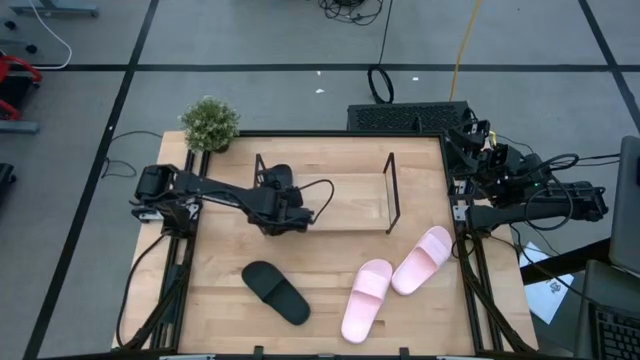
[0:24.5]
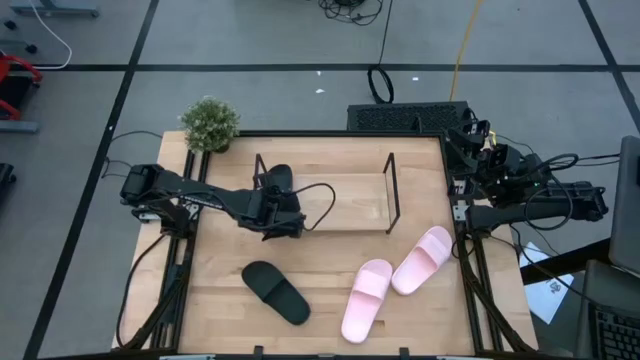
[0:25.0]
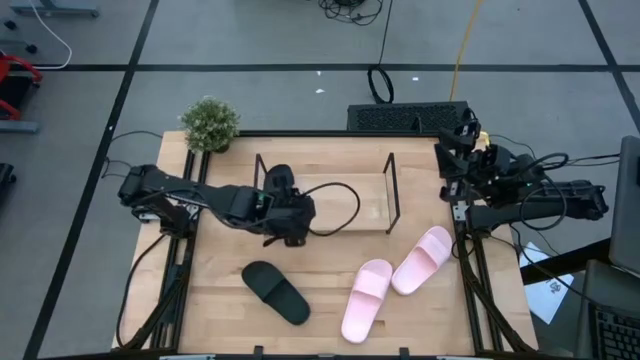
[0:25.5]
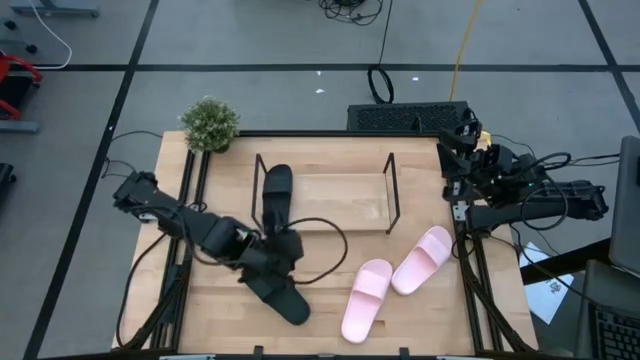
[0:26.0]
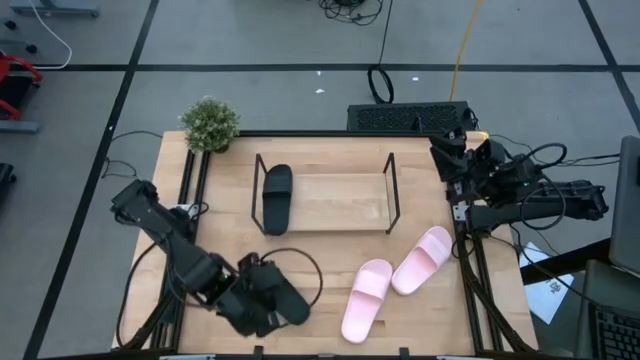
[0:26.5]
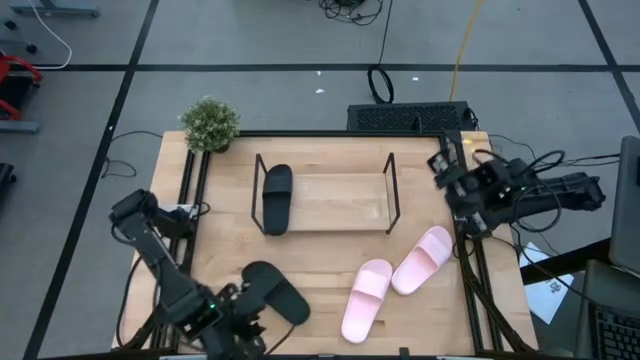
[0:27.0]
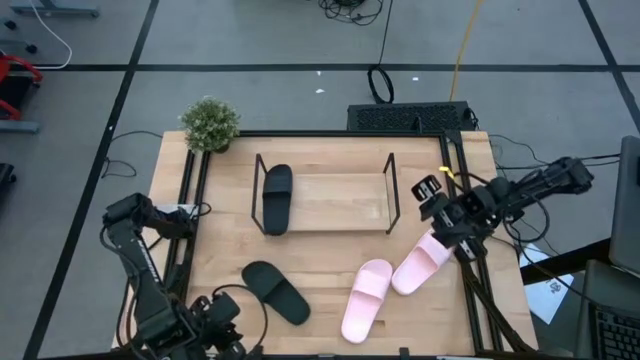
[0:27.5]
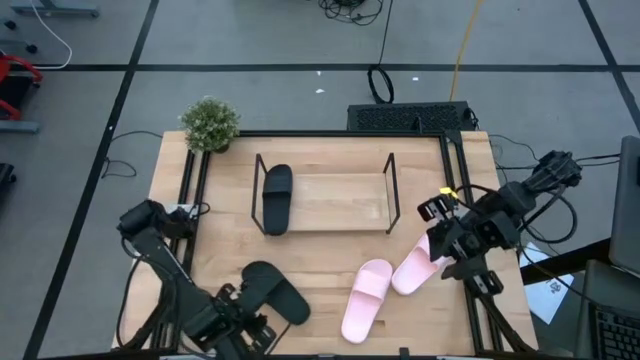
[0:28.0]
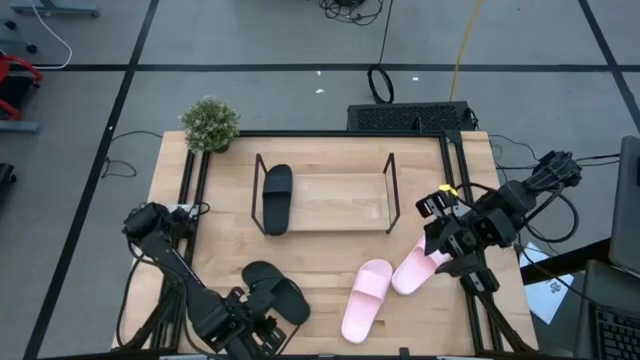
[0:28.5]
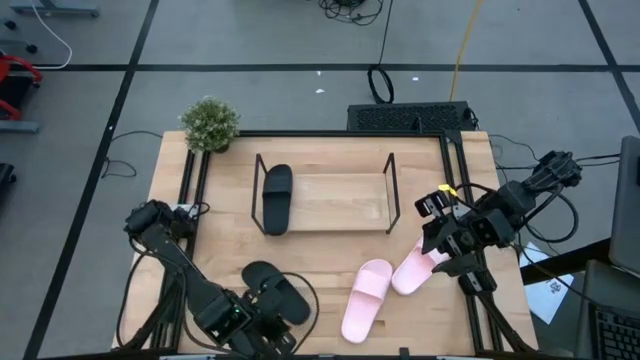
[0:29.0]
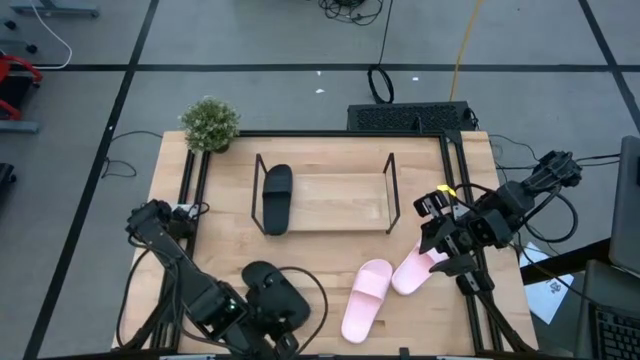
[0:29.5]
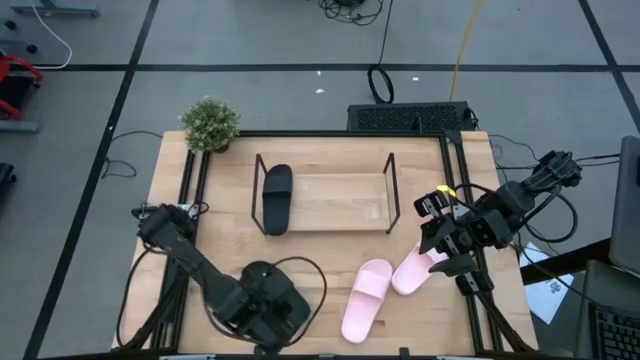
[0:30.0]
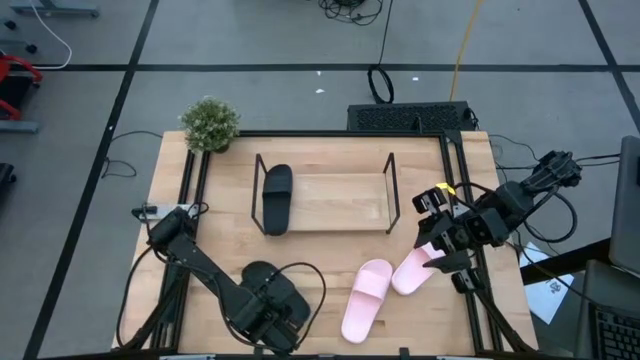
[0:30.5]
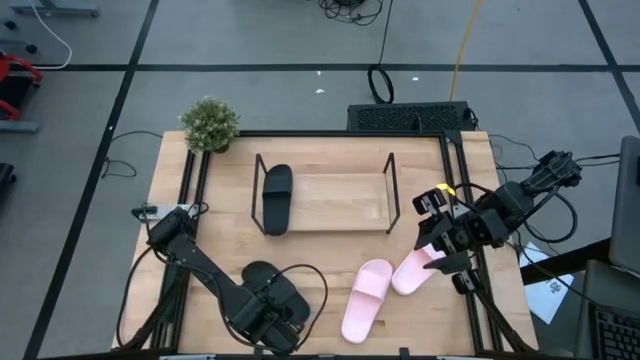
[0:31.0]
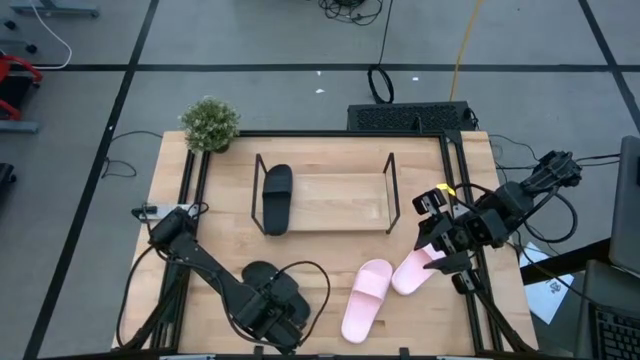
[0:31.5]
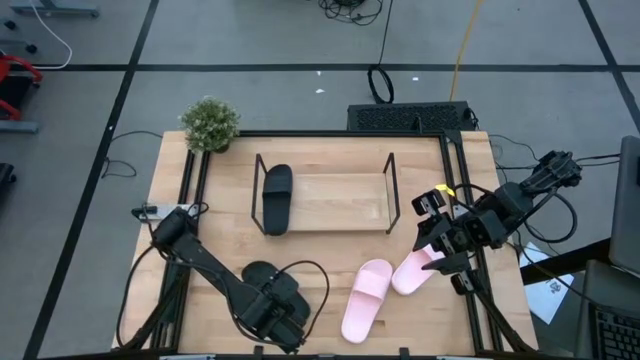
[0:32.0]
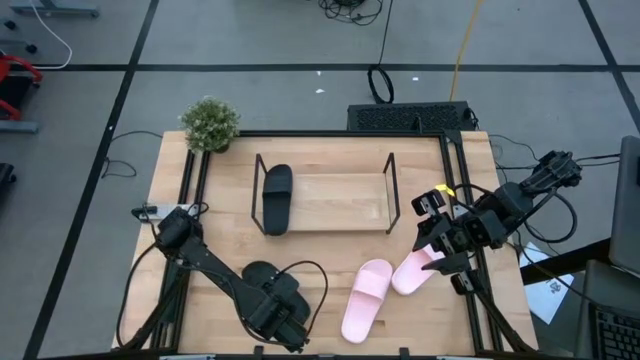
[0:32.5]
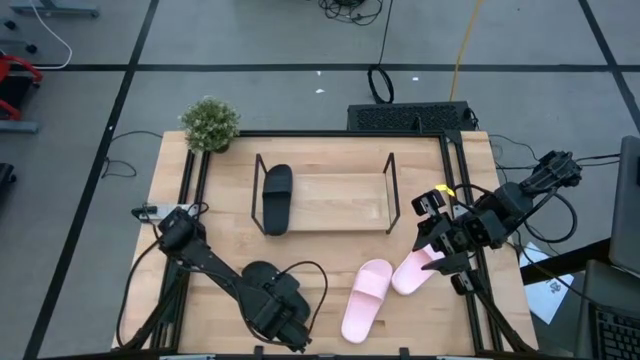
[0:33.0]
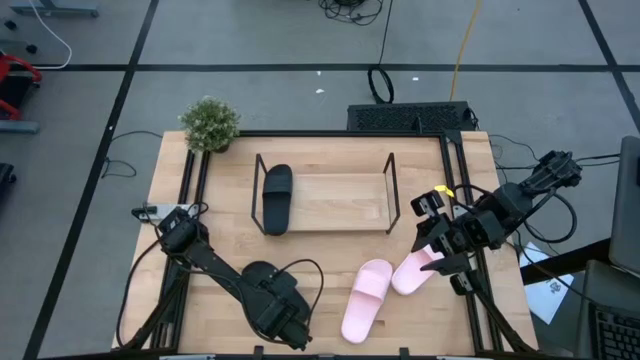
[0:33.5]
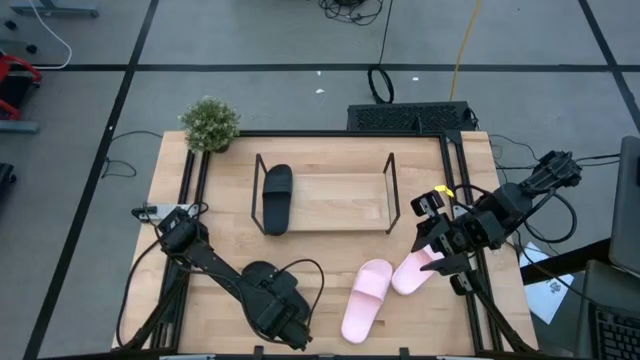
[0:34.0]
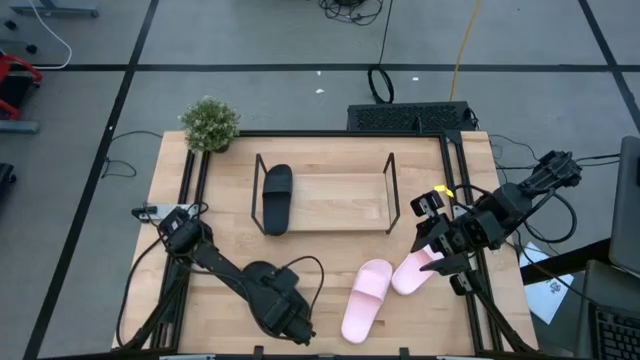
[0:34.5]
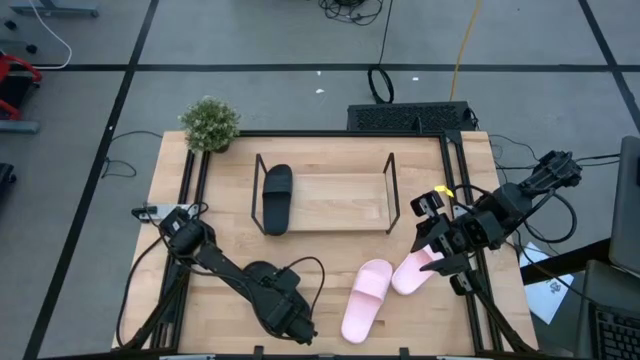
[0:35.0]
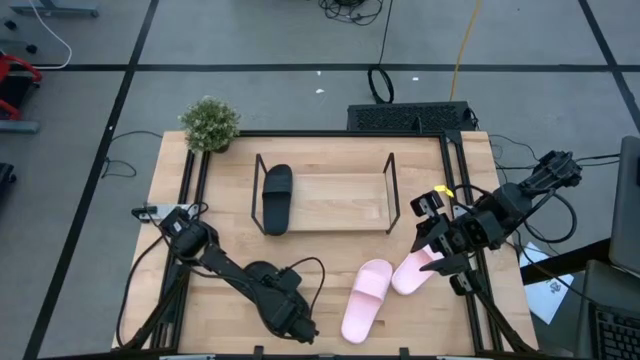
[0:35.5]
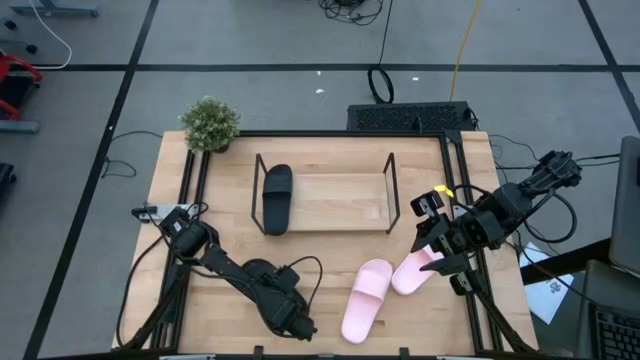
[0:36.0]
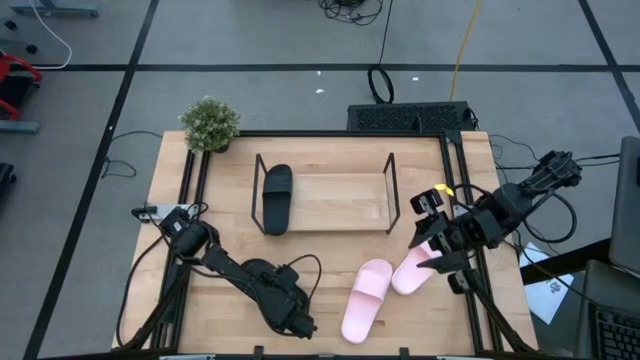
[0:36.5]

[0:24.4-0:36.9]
Task: Pick and place slides into the shelf
Put the black slipper on the shelf

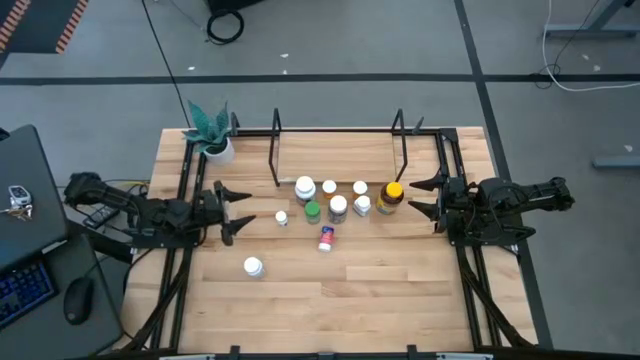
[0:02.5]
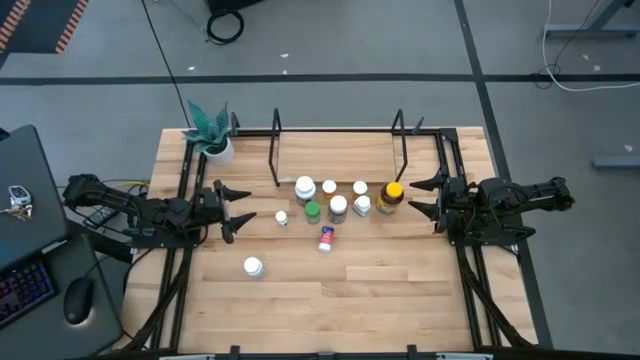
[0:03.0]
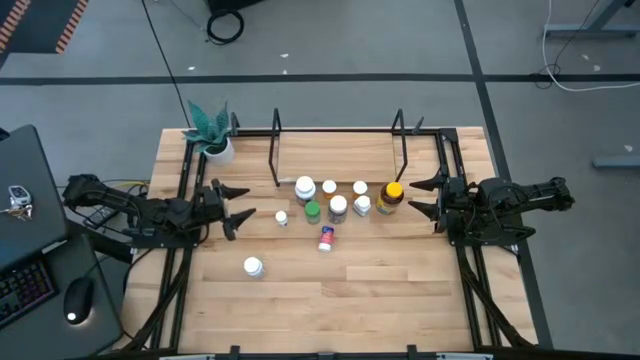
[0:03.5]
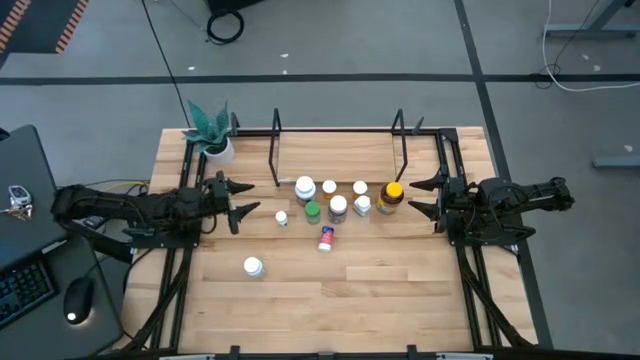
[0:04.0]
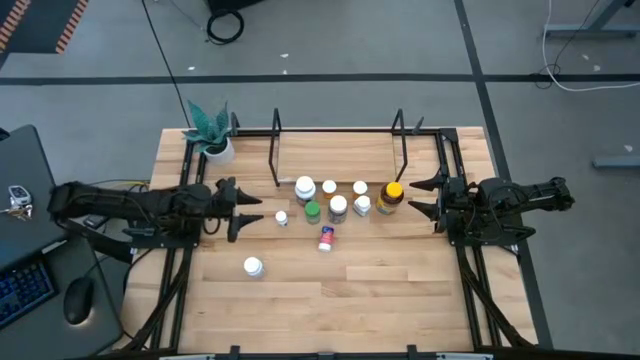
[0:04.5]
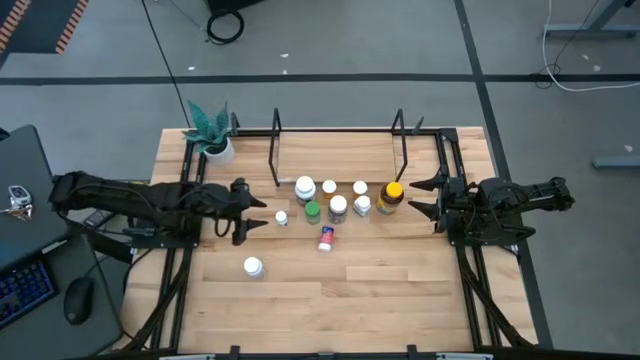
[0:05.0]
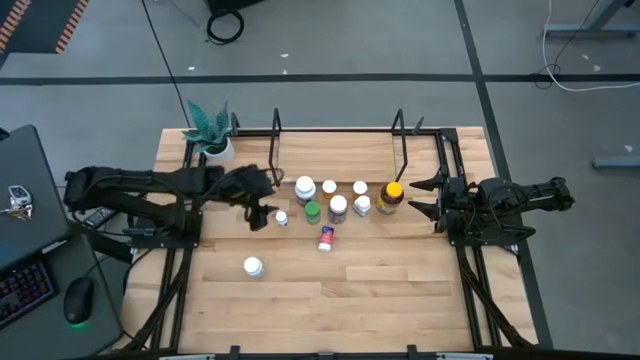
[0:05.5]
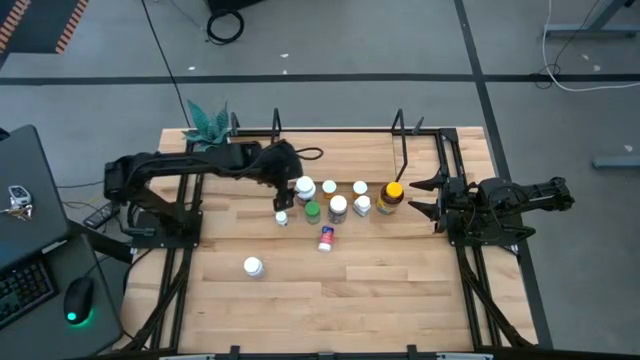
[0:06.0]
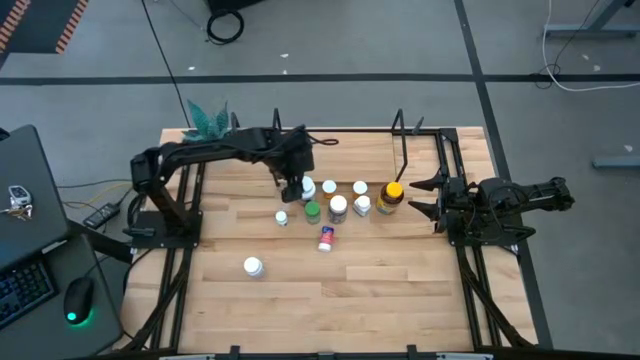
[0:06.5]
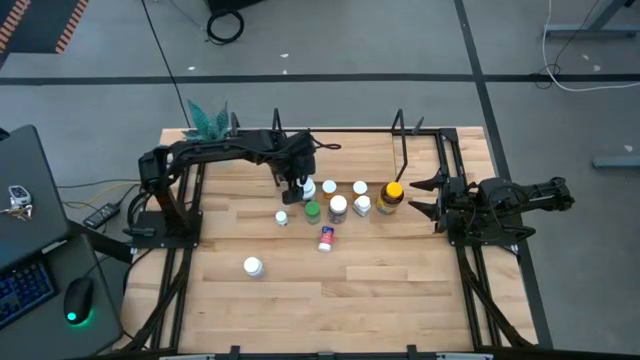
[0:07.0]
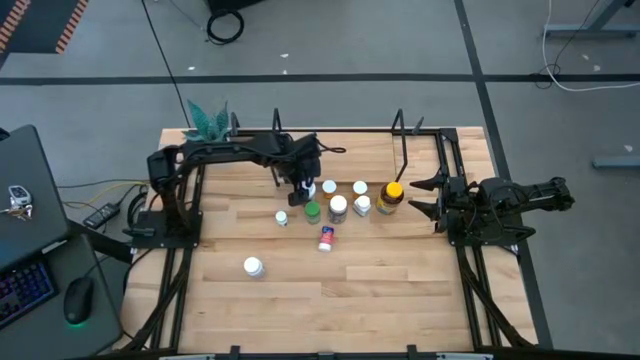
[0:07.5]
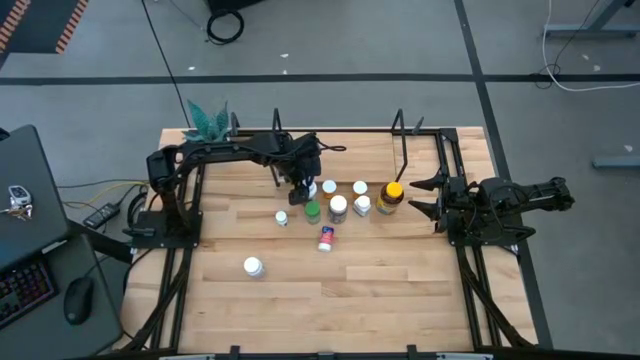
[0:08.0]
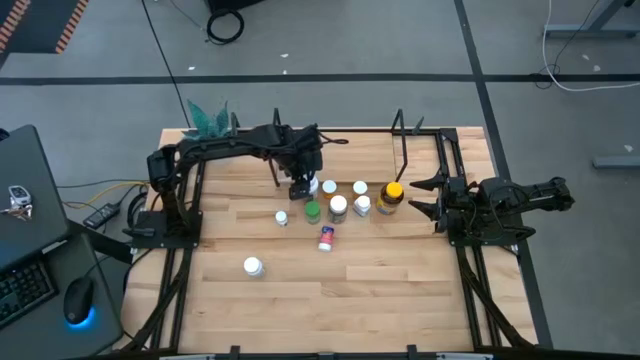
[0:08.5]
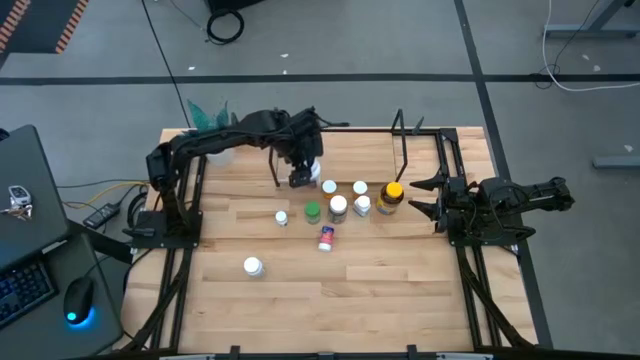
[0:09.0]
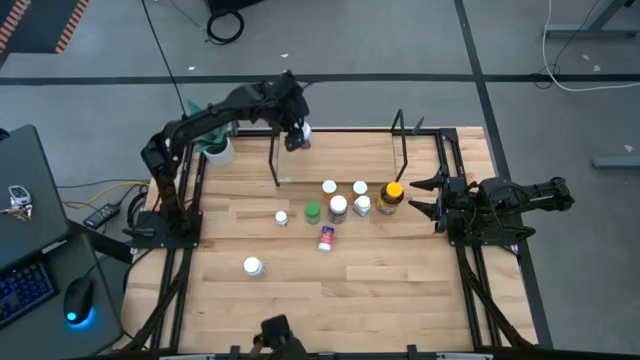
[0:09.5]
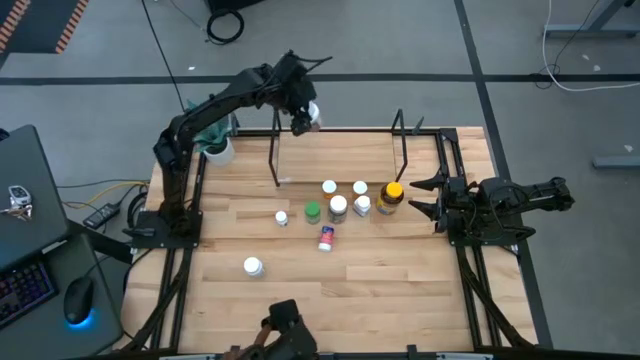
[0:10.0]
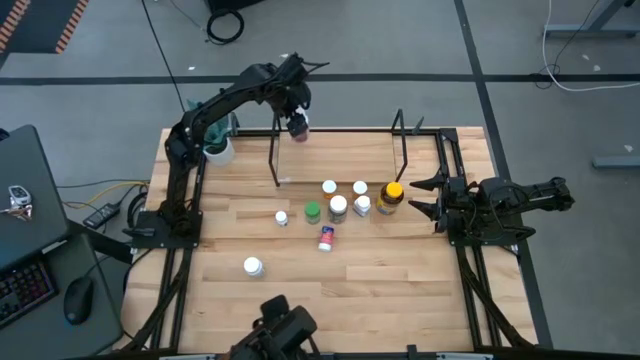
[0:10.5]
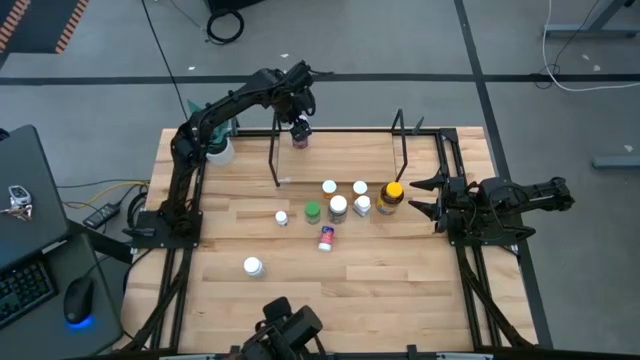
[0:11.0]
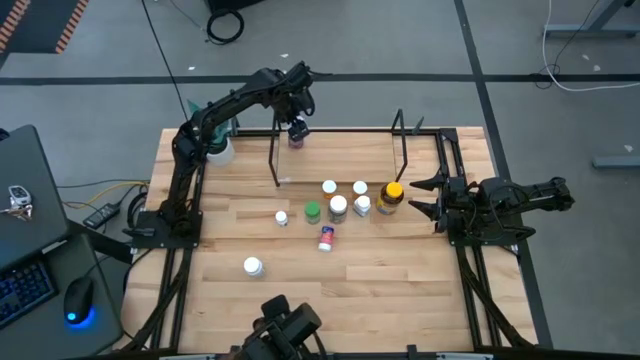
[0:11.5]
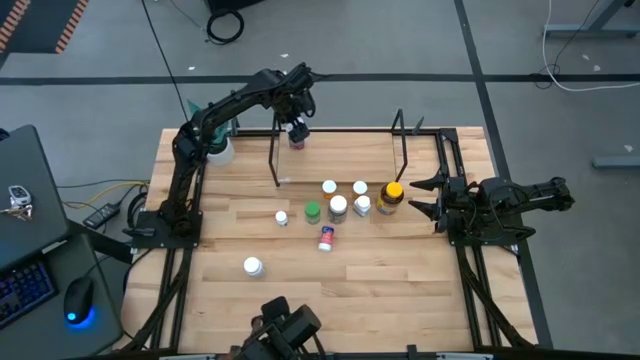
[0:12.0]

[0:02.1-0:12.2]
Task: Pick and place medicine bottles onto shelf by color
Put the big white pill bottle on the shelf
